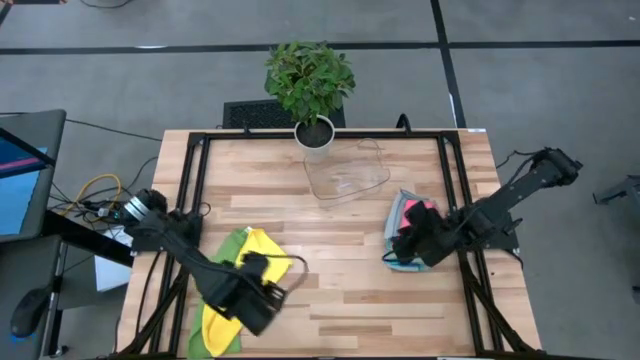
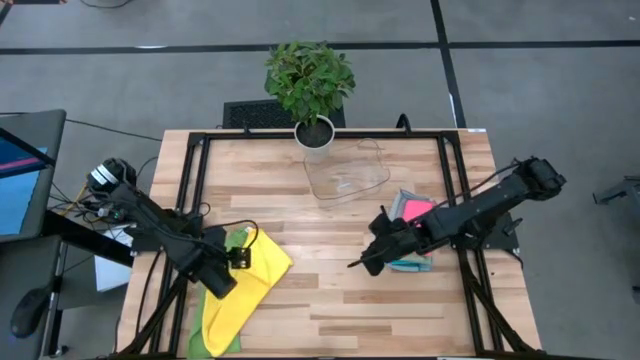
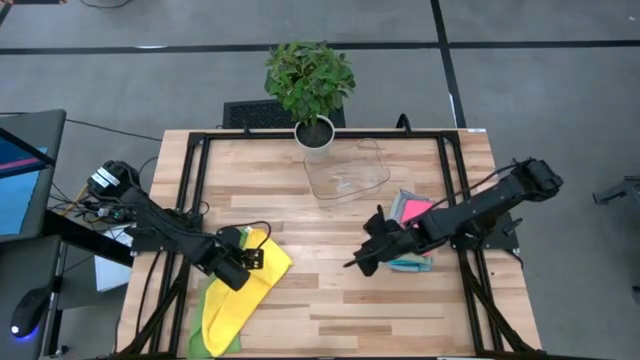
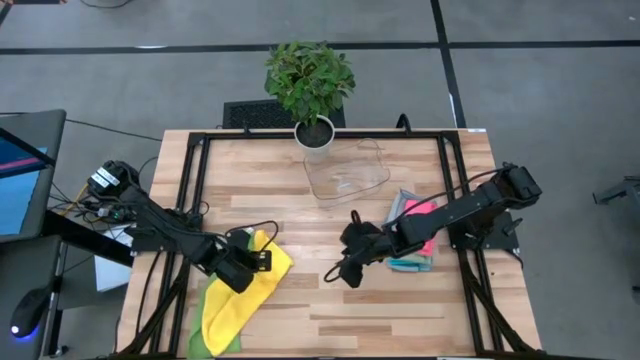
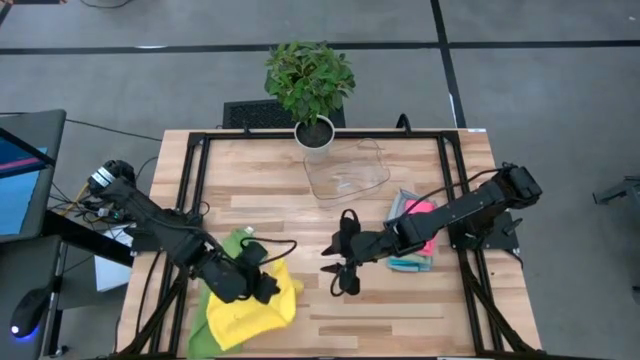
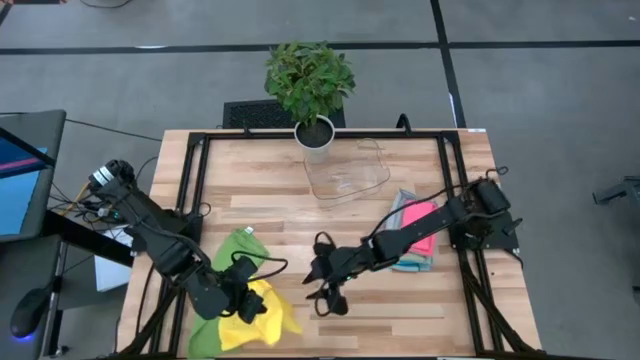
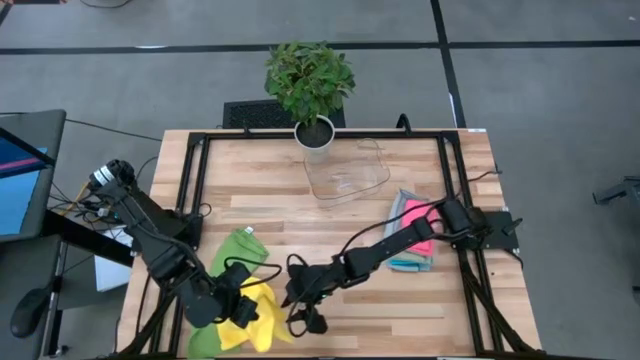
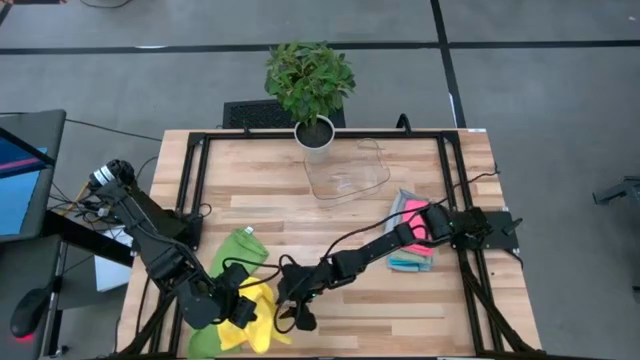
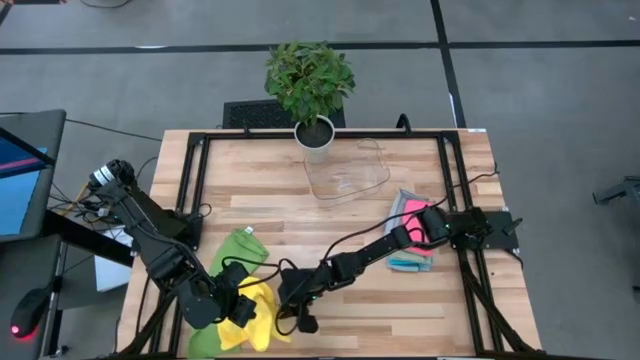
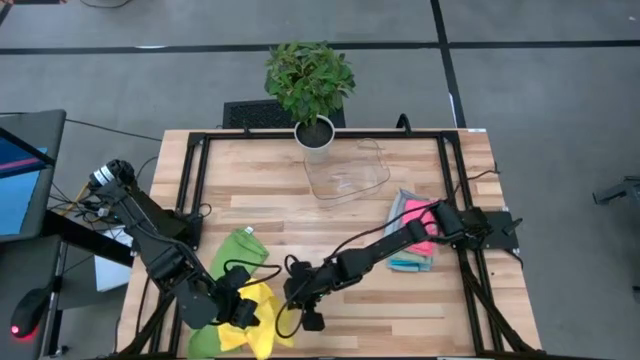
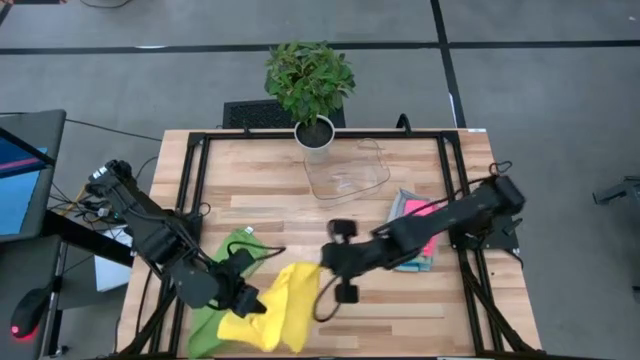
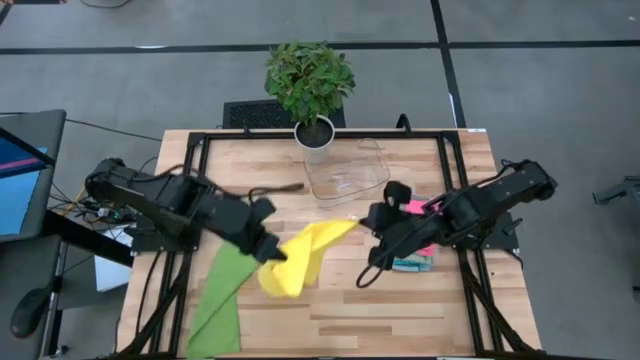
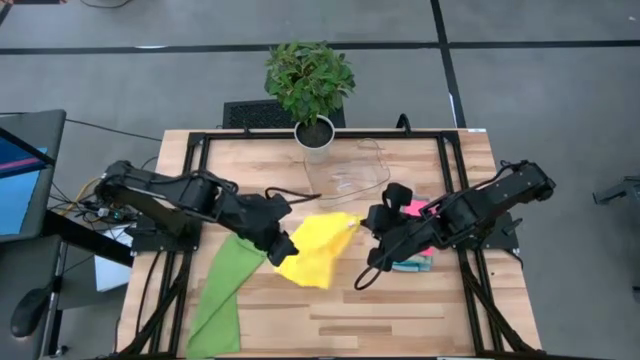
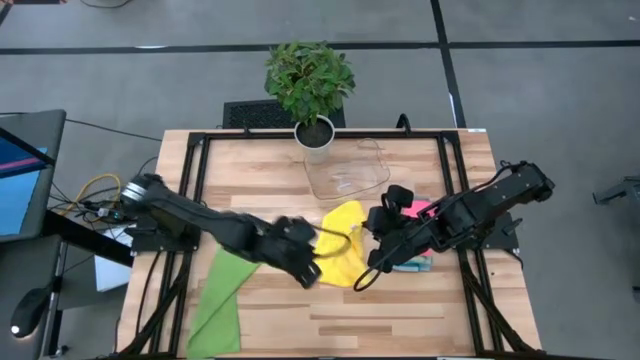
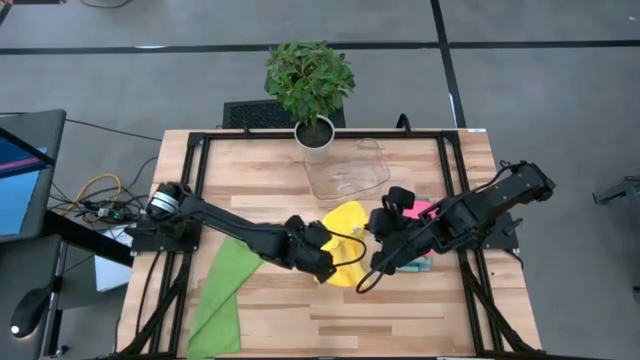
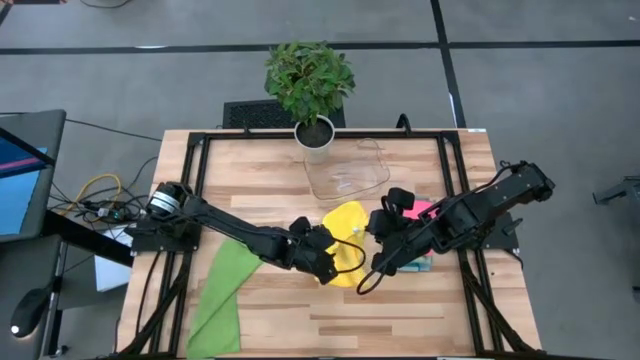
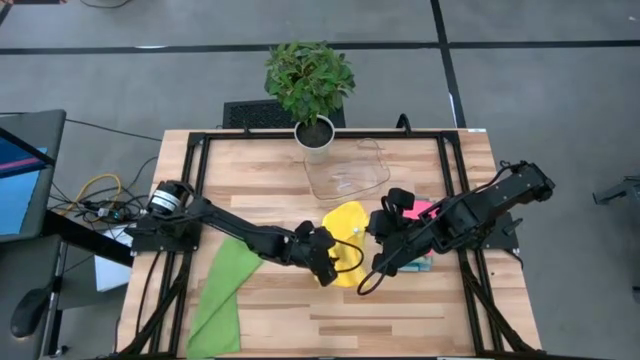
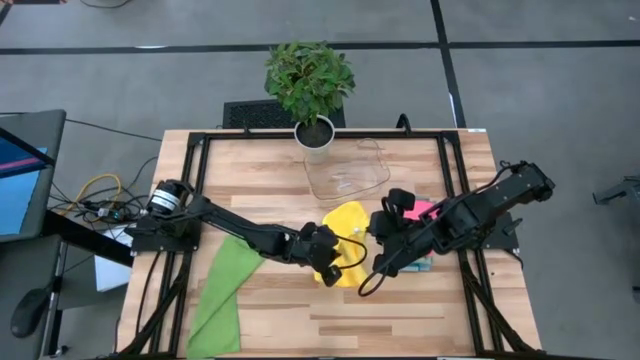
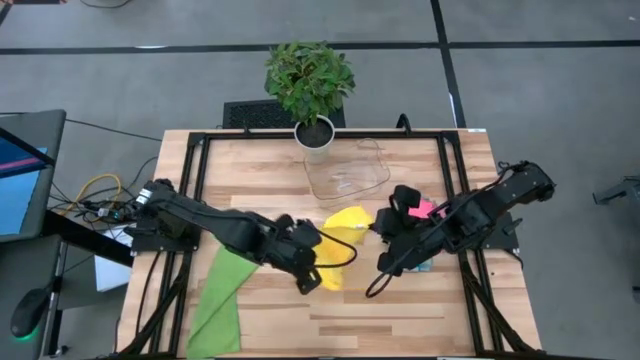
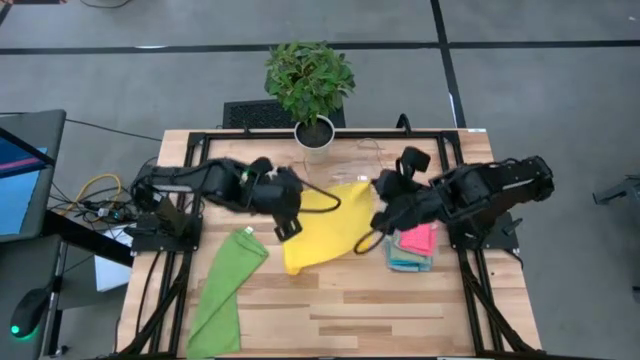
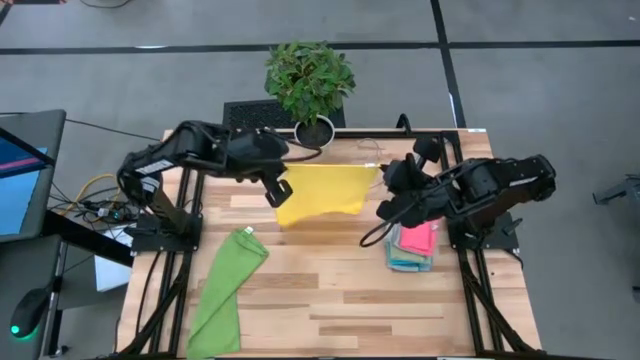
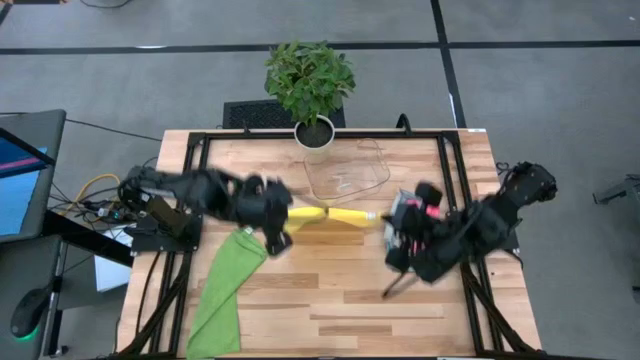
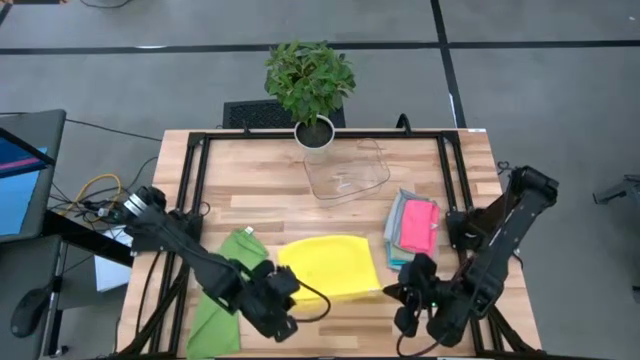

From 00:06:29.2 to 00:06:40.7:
Task: Fold microfiber towels
Fold the yellow microfiber cloth
